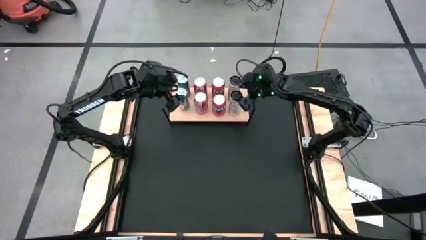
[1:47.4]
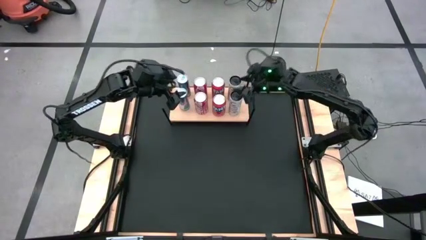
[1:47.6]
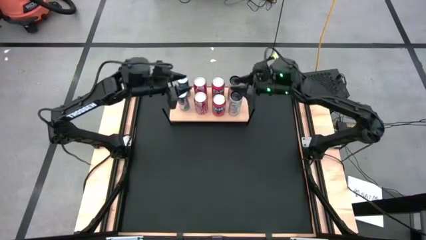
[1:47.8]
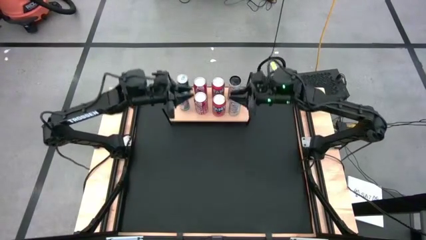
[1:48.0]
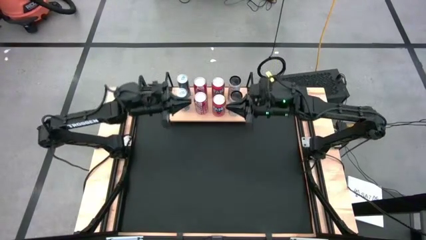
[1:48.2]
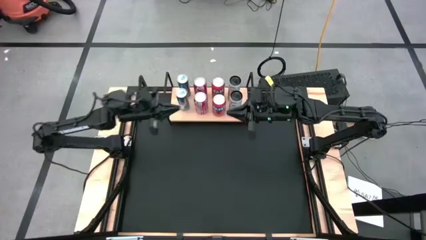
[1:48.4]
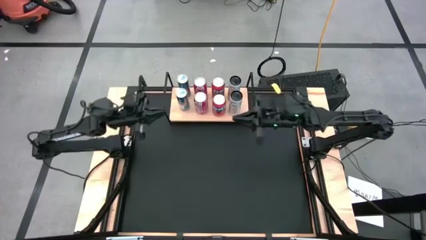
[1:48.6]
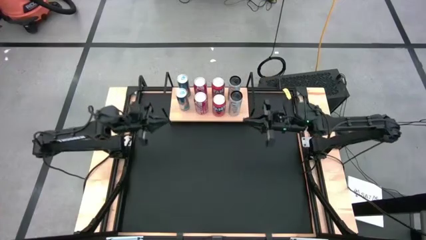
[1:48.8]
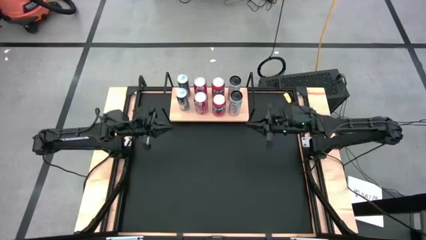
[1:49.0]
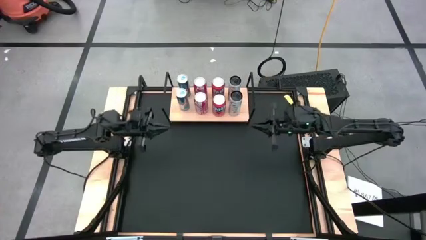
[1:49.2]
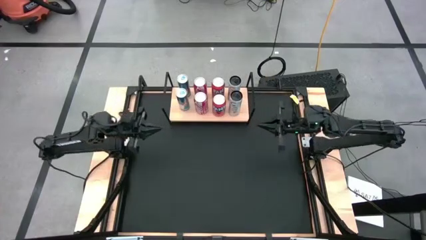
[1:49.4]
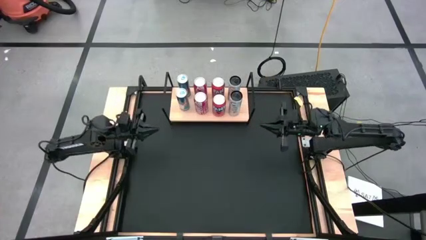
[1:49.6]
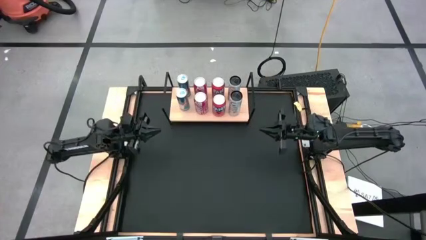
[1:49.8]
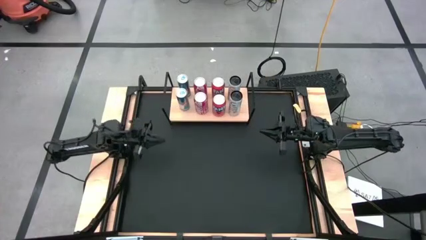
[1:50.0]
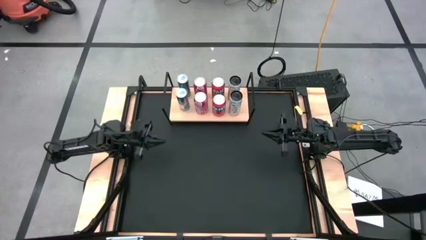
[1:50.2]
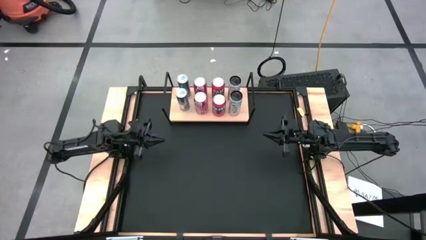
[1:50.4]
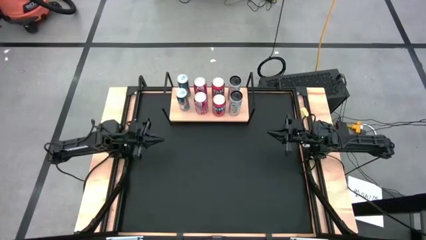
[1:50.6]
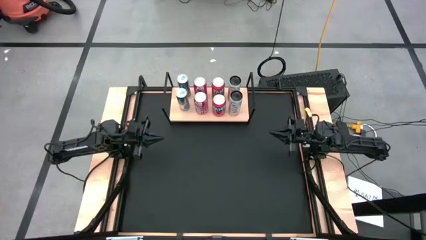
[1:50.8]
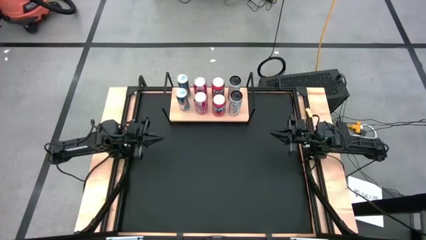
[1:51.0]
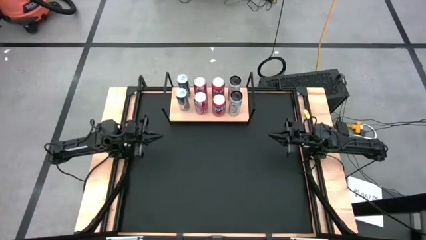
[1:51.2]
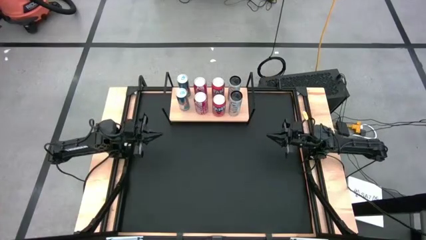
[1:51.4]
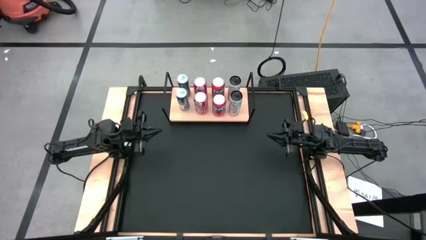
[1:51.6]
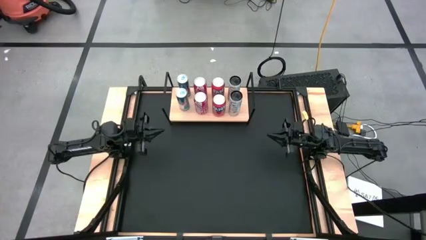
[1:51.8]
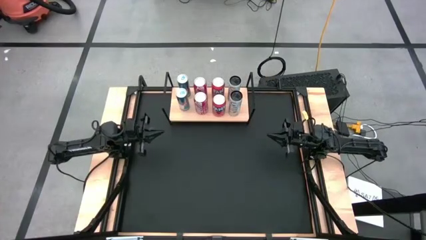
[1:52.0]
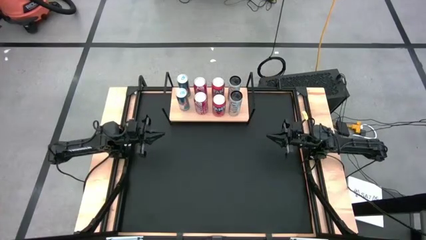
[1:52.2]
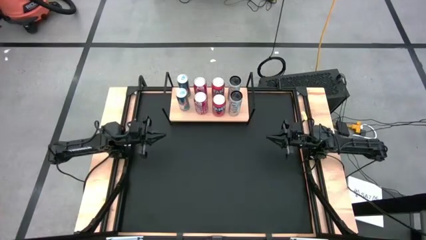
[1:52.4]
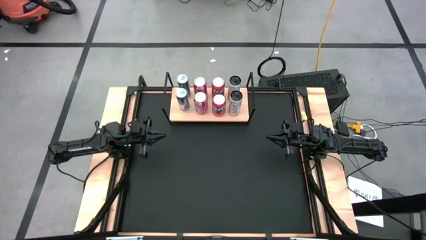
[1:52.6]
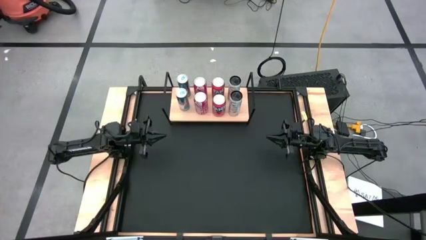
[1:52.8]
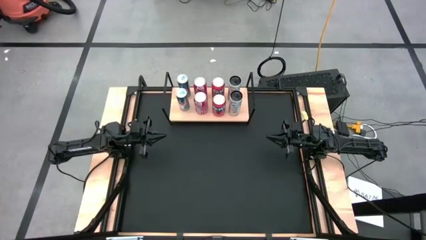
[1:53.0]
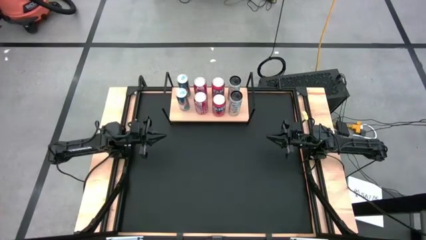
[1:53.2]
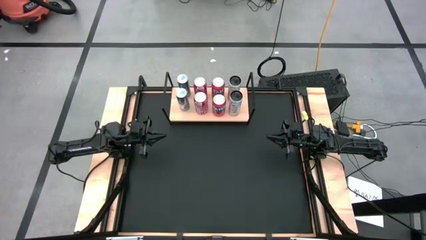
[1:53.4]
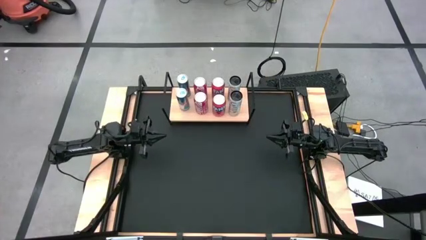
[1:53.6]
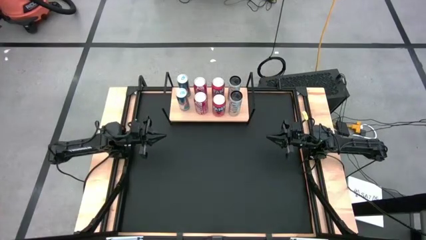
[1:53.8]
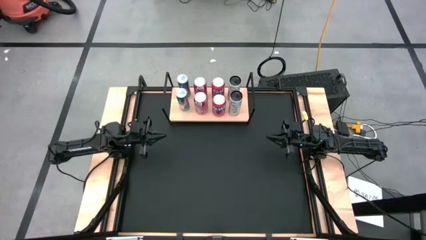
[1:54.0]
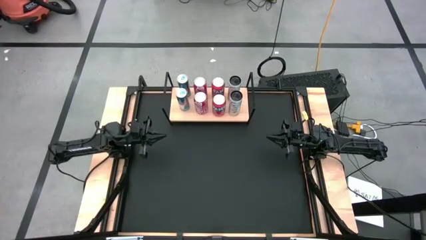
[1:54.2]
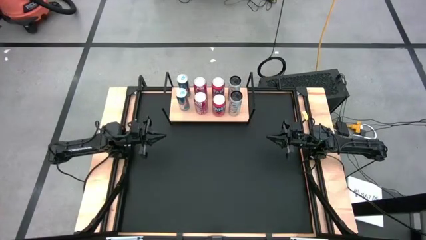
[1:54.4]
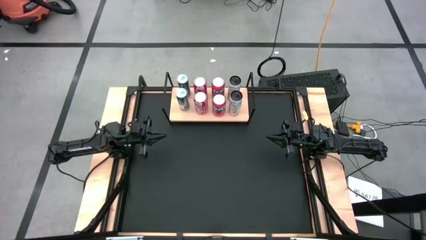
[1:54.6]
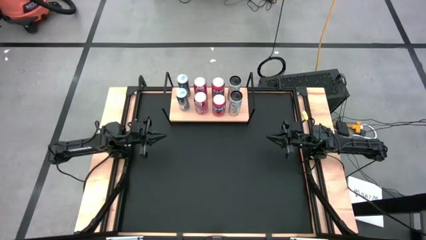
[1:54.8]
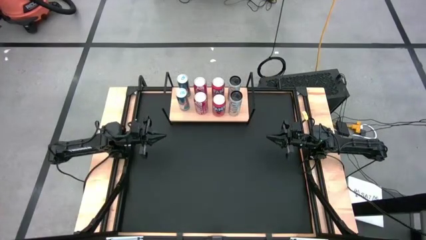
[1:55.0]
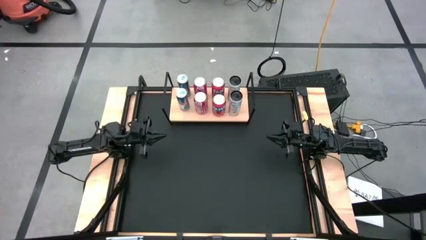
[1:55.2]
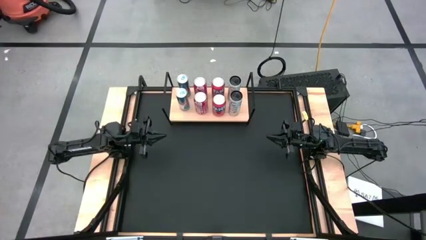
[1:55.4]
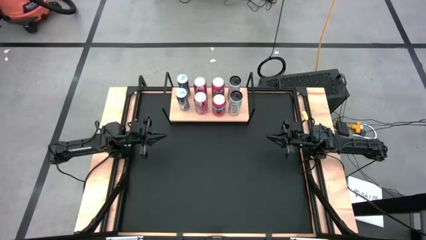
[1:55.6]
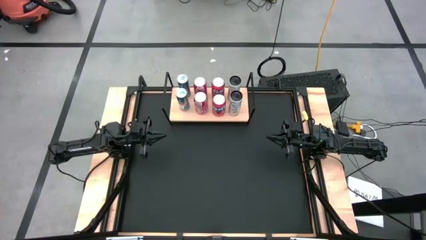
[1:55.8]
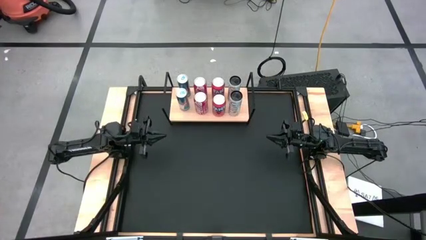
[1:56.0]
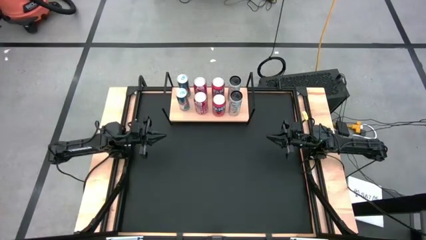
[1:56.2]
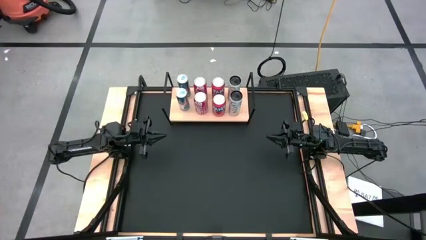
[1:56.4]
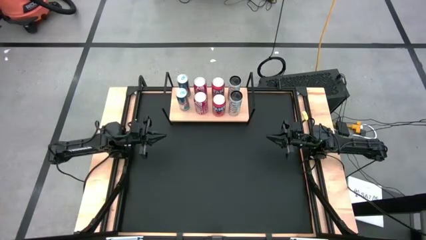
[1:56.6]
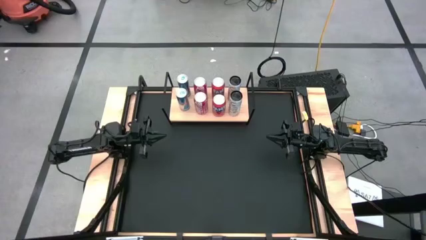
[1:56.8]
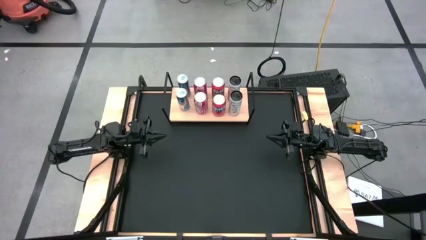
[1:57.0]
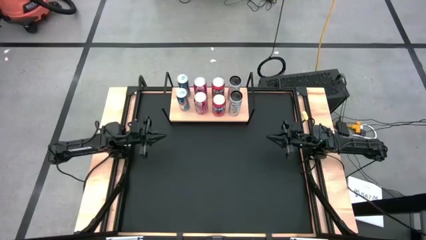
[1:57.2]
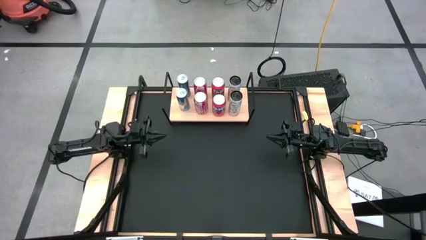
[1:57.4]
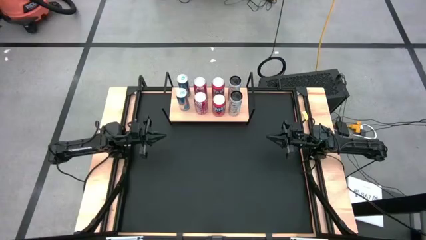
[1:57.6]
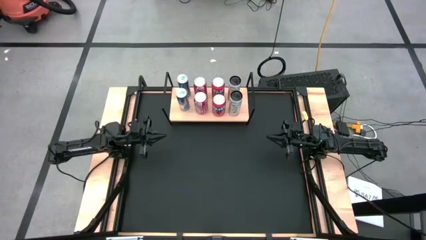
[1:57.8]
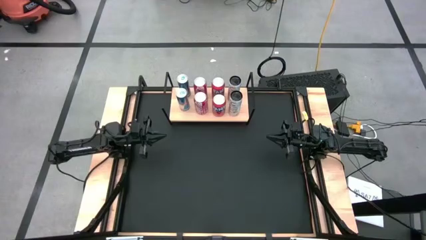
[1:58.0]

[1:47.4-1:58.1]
Task: Place canned beverage on shelf
Return to Home Position

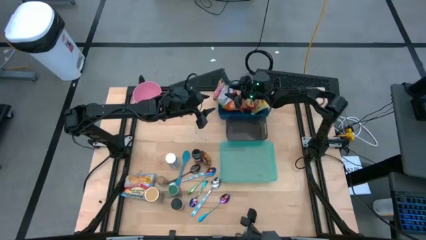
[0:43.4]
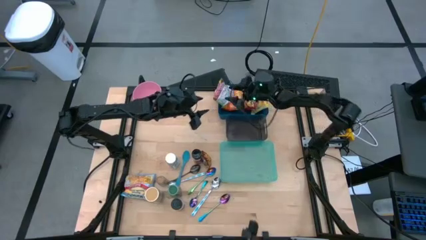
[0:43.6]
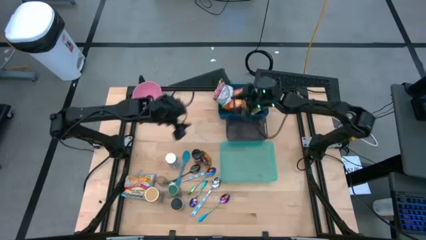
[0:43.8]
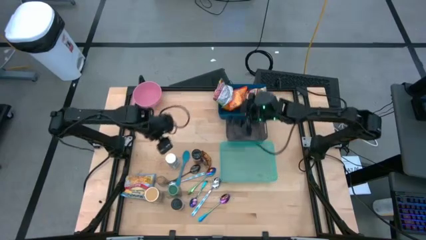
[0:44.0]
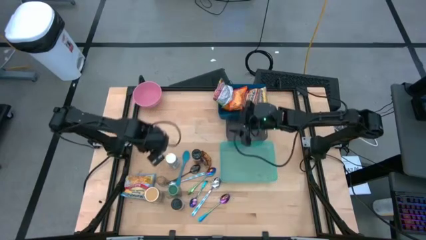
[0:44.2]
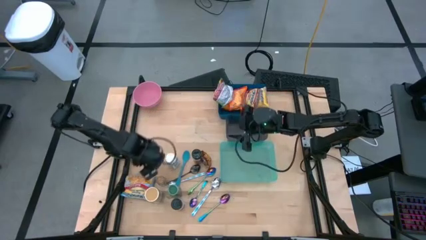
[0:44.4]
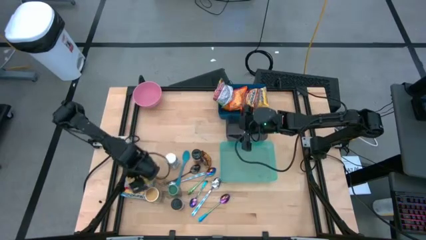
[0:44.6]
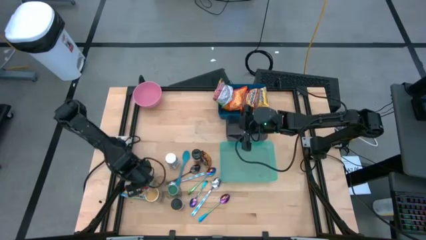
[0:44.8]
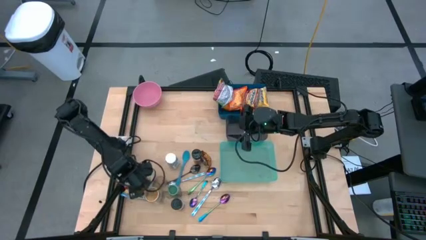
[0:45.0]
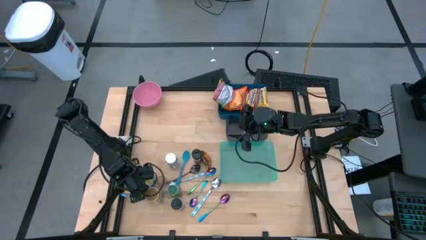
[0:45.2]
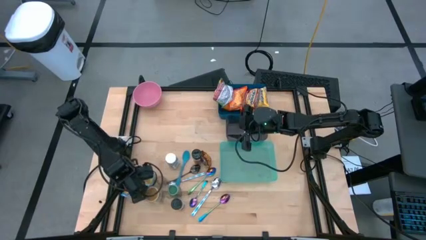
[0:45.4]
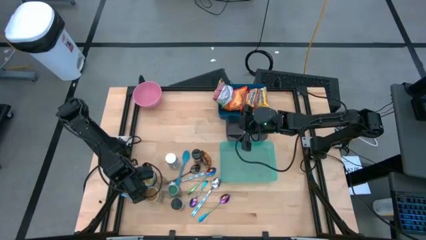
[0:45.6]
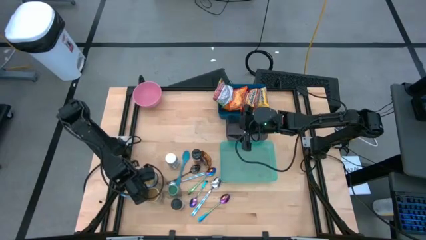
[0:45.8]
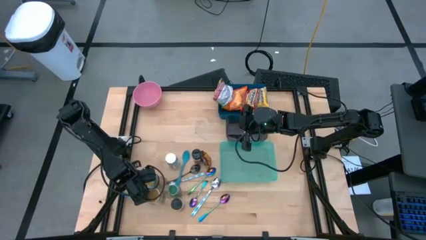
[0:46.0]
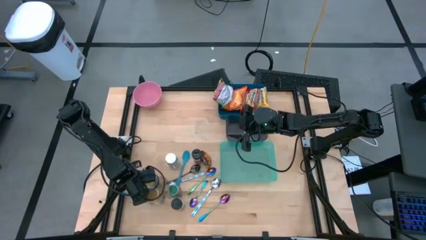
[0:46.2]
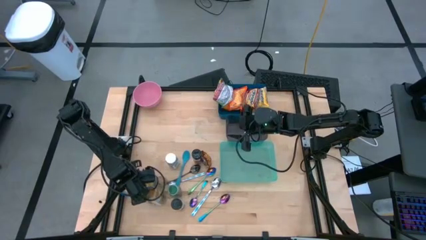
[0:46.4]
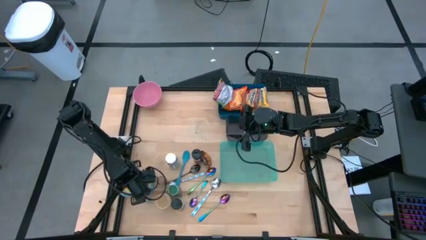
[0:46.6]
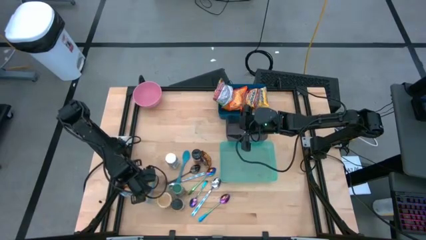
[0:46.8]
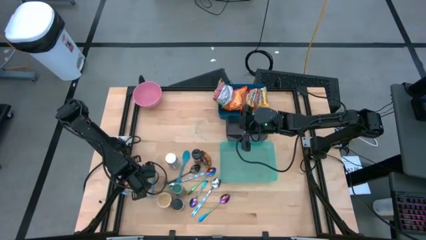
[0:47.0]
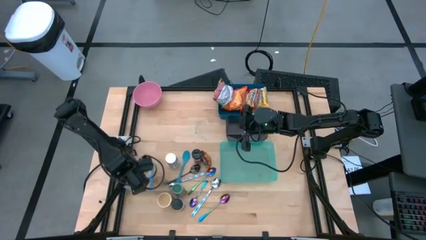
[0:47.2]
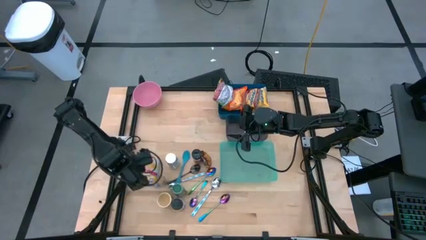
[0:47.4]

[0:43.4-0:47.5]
Task: Pick & Place Food Item
Put the blue noodle pack into the blue bin
